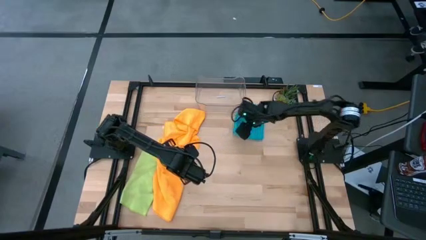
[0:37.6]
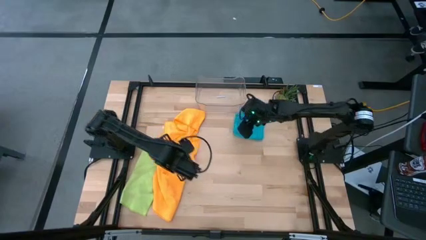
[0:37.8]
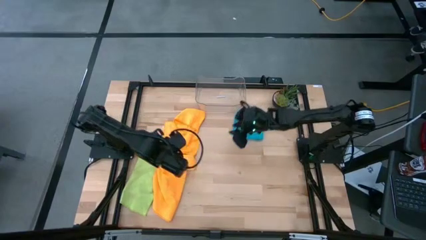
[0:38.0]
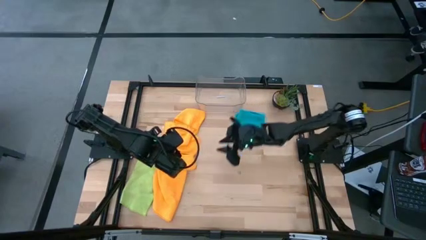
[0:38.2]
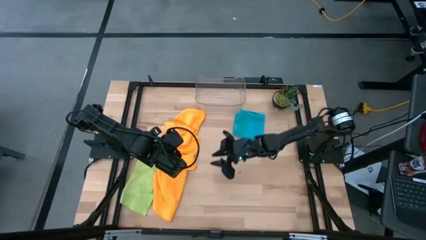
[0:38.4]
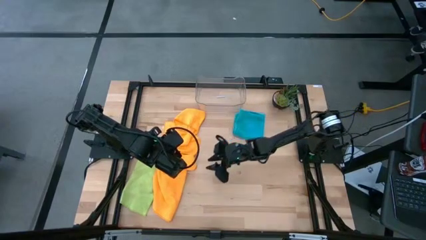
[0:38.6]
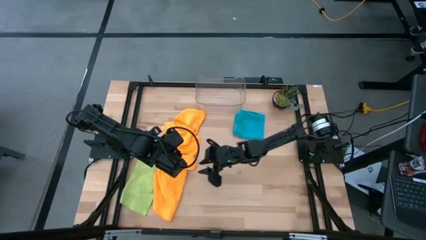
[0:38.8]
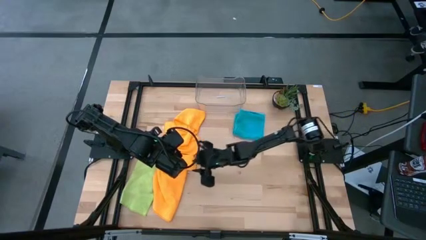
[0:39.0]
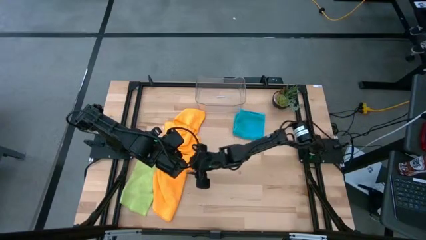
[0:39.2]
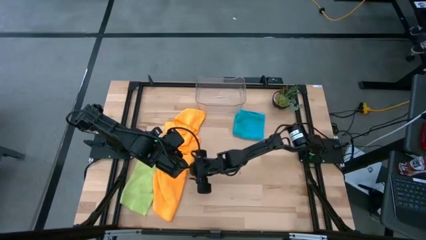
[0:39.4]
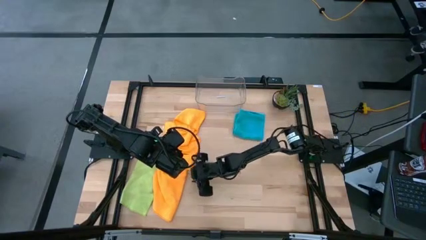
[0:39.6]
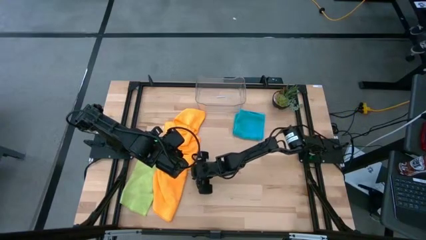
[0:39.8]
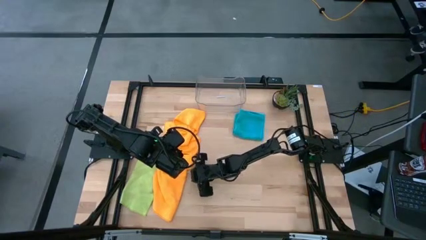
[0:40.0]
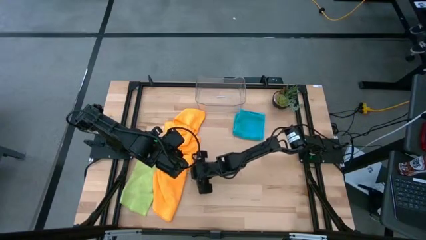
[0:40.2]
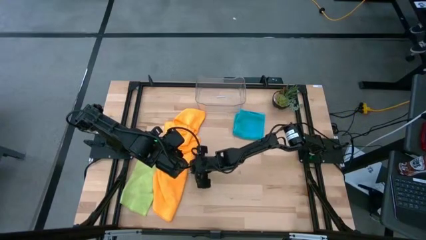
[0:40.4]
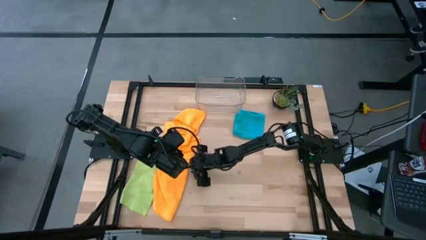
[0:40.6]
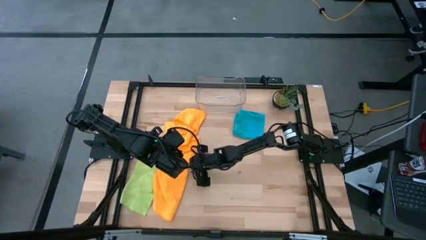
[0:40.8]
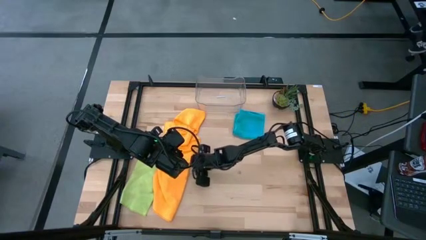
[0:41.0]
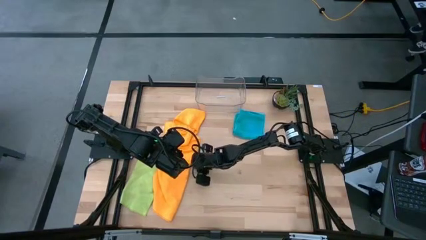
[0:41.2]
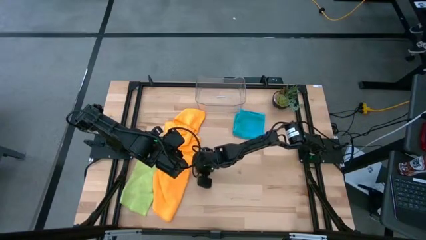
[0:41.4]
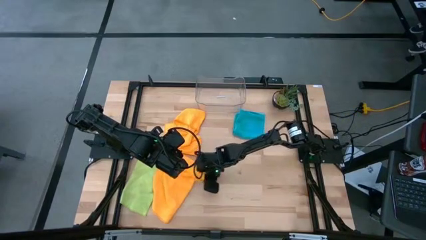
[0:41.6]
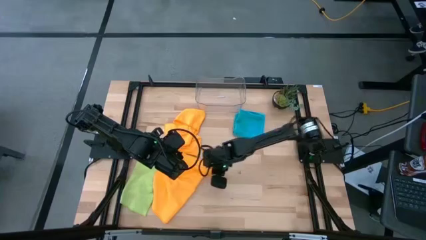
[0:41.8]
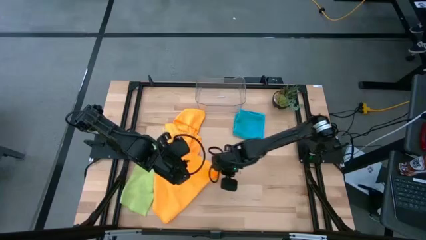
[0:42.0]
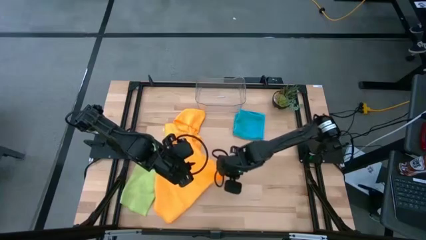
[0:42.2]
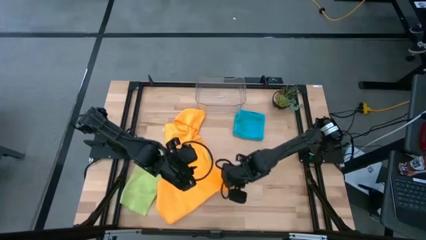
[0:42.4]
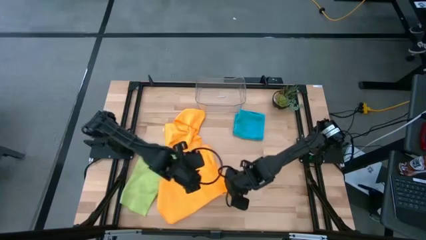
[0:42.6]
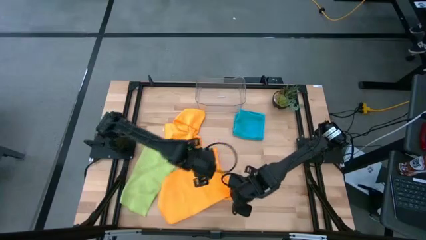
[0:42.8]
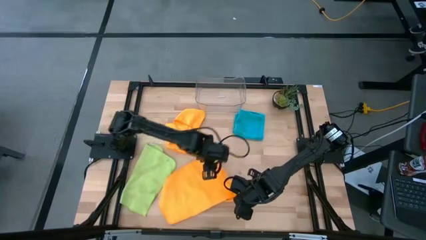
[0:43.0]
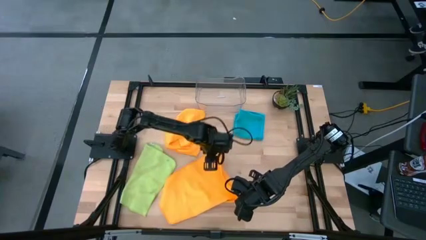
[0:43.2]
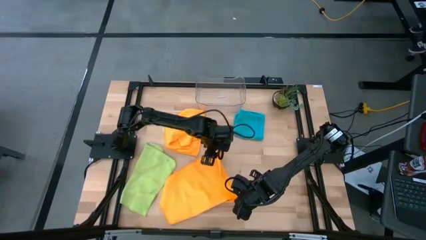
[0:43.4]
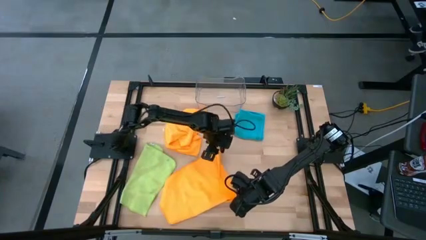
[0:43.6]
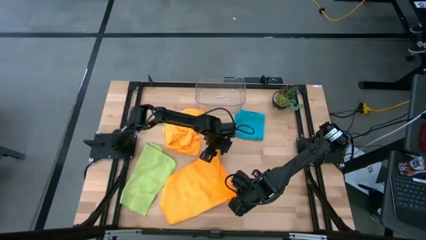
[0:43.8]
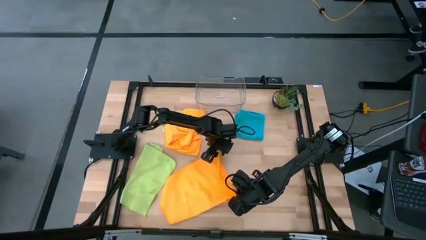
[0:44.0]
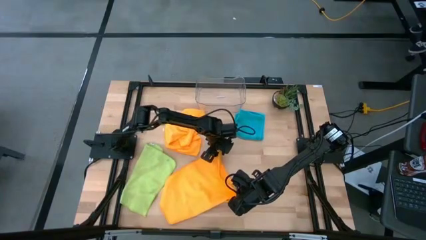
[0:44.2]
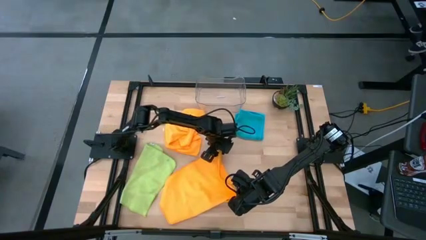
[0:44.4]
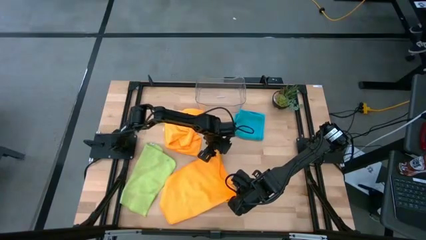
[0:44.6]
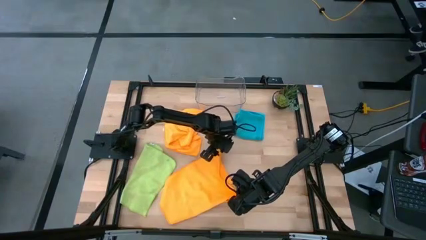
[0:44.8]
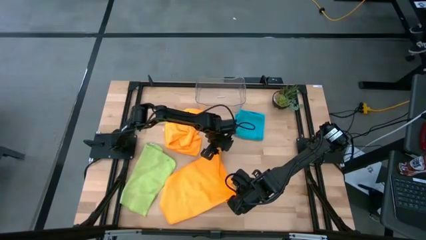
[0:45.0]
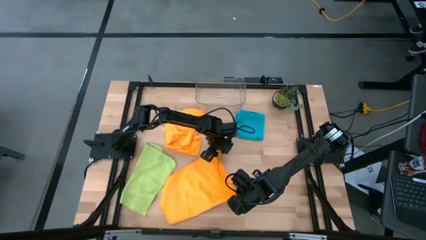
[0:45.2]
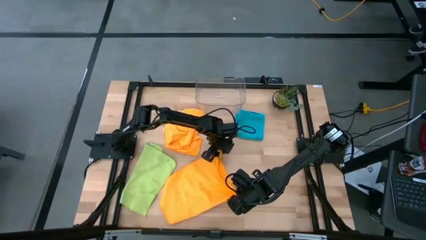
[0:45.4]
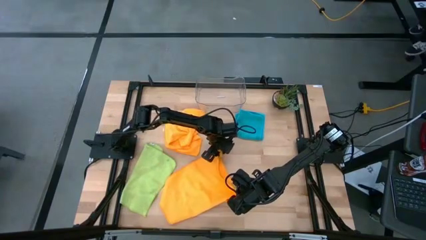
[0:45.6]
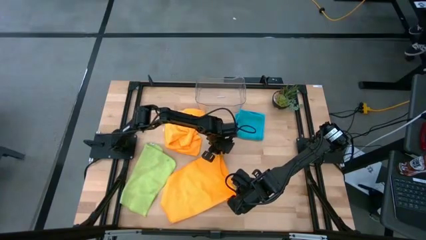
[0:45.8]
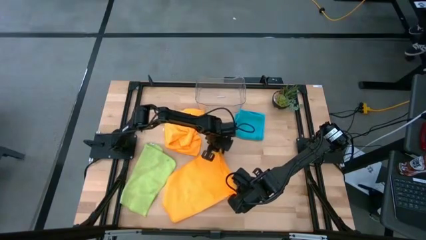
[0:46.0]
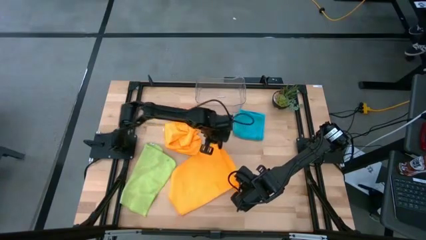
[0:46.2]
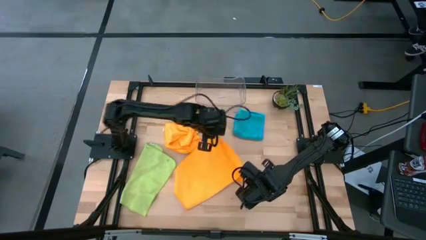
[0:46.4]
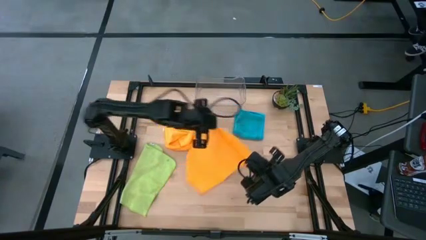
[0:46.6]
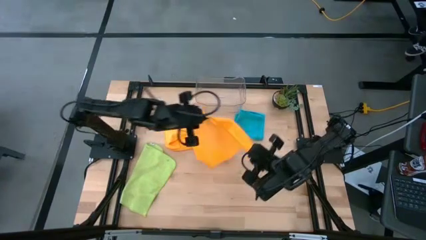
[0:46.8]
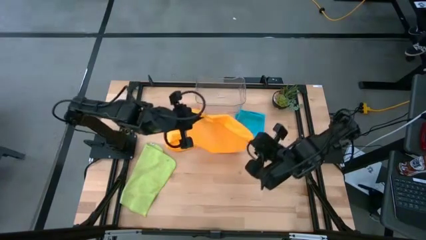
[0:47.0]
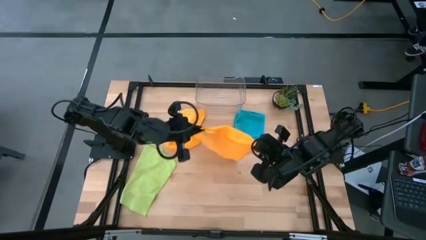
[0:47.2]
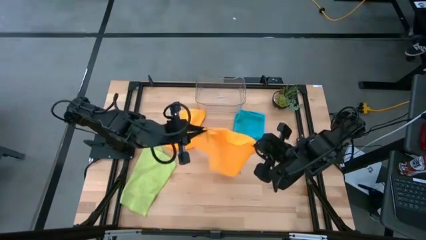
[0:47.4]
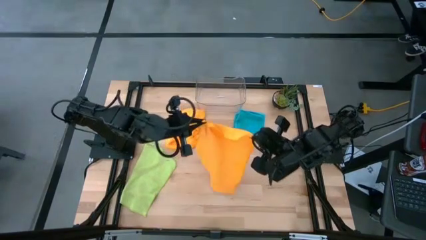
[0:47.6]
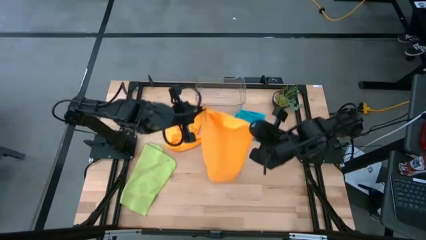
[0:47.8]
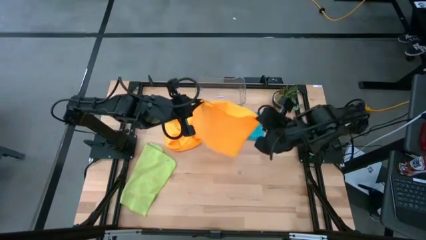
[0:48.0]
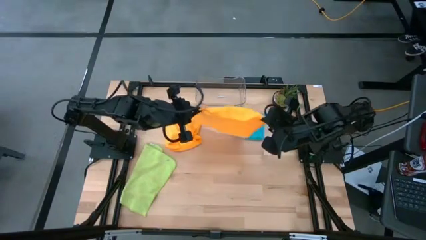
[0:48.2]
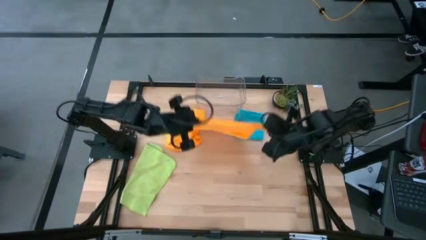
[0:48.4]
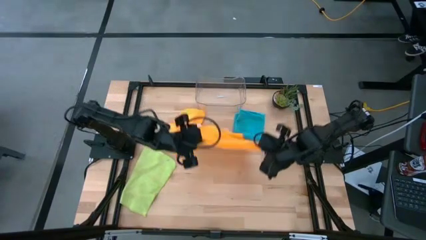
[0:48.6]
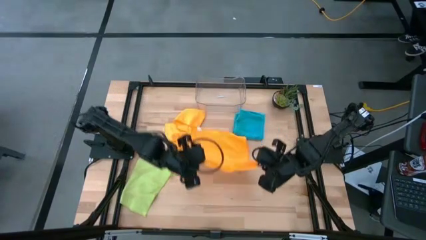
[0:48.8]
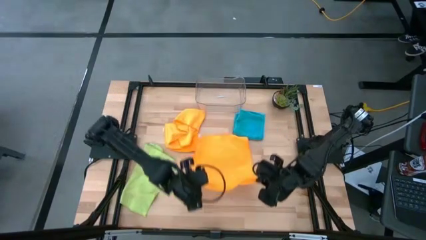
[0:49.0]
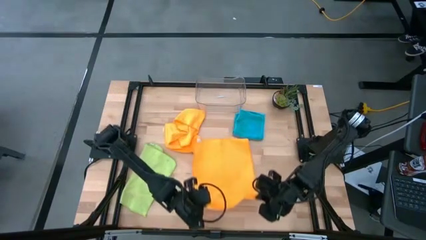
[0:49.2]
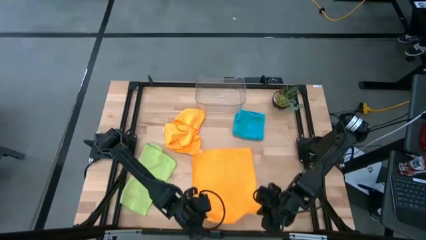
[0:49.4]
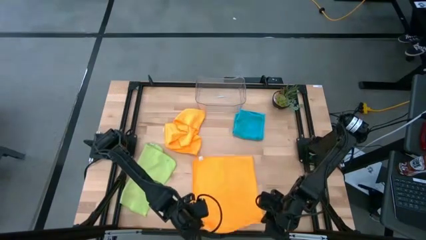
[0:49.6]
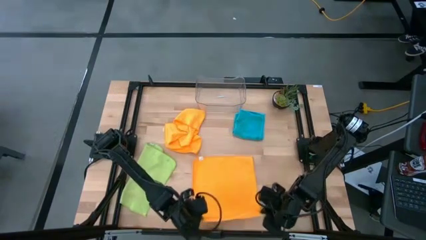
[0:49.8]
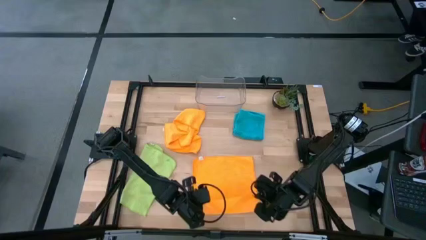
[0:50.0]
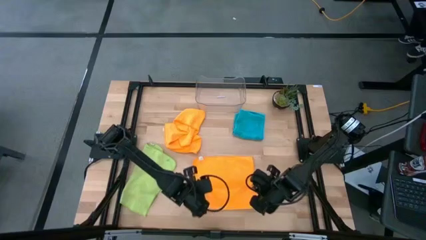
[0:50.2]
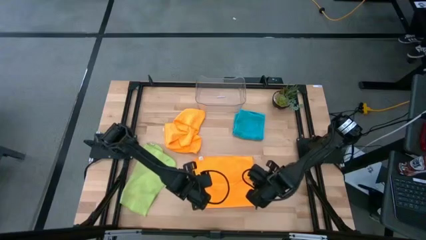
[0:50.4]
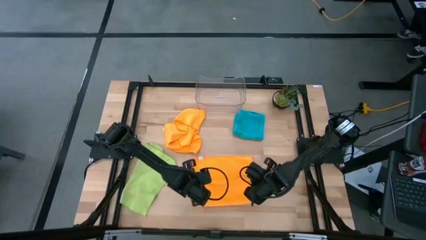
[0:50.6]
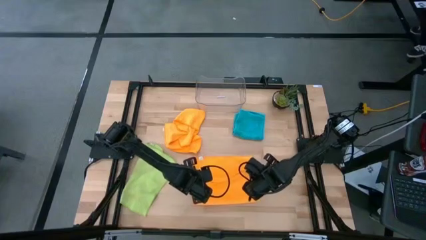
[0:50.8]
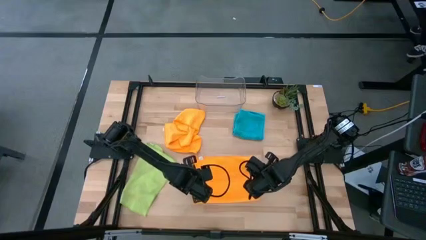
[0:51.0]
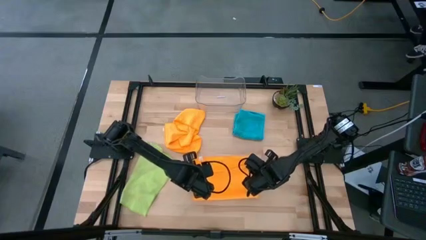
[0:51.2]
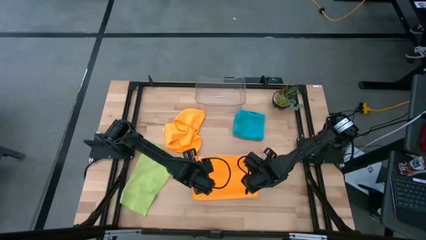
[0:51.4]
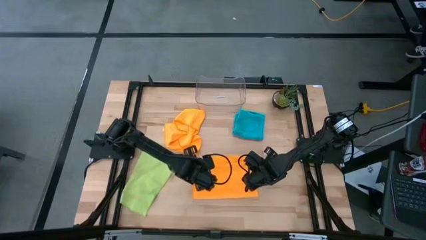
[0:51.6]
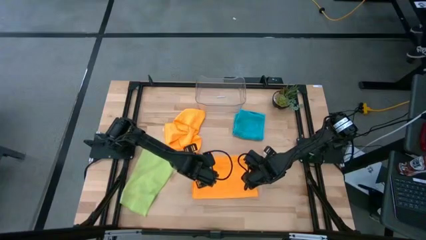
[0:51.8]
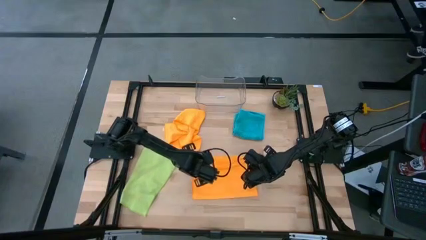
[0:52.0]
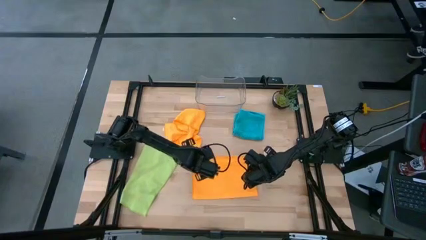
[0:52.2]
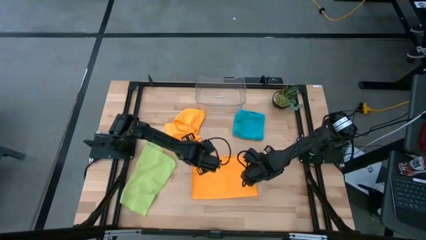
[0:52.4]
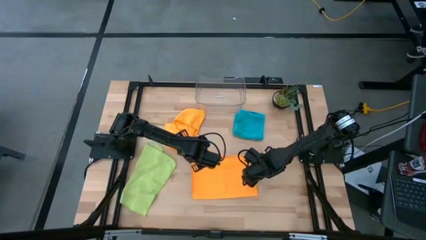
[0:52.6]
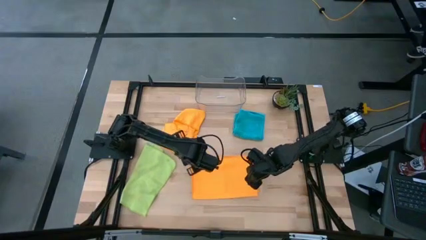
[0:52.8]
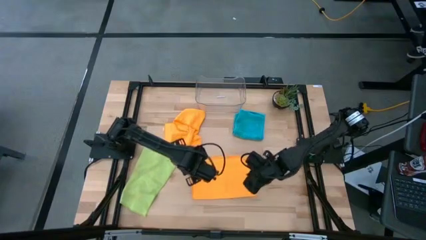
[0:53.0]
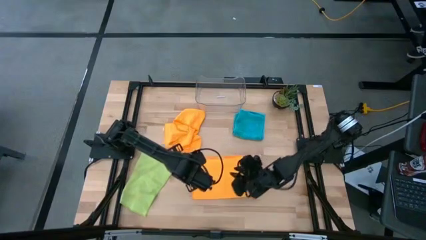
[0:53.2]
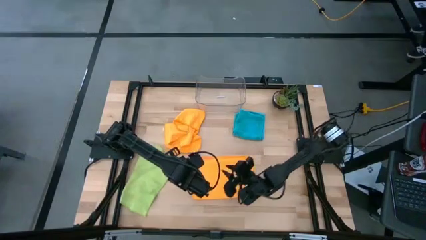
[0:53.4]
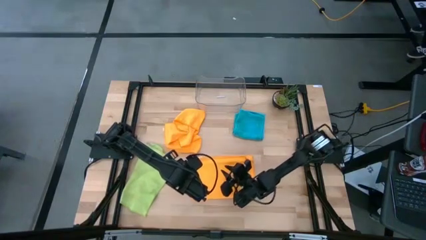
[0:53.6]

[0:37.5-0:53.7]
Task: Fold microfiber towels
Fold the bottom orange microfiber cloth
